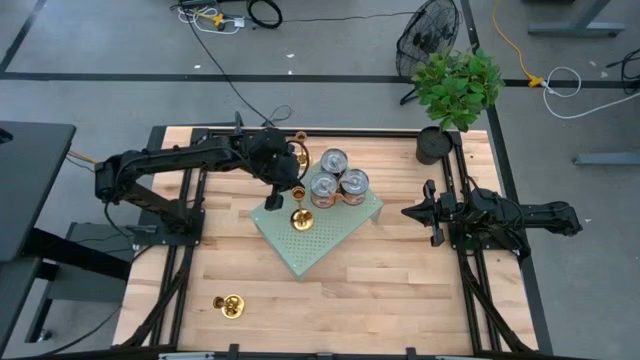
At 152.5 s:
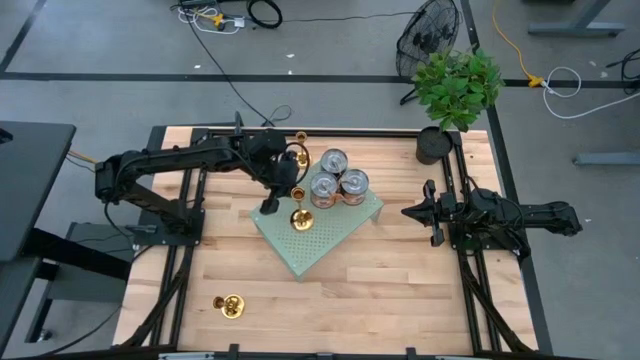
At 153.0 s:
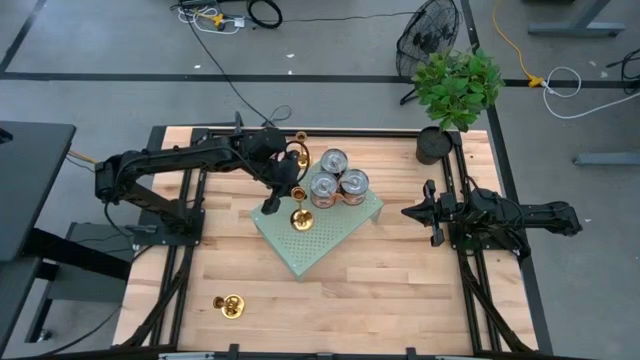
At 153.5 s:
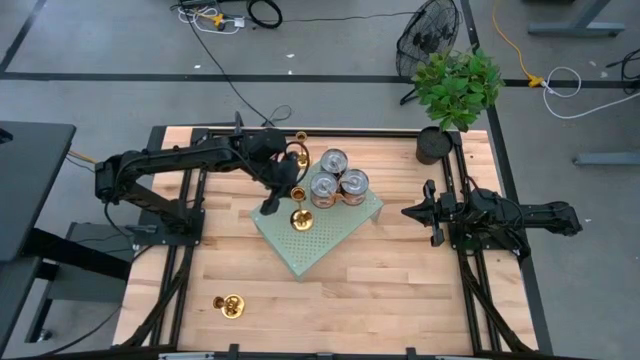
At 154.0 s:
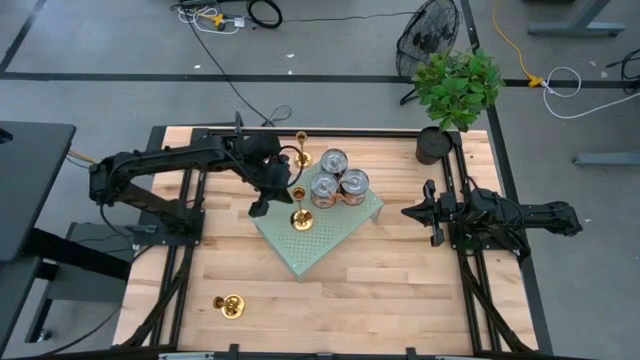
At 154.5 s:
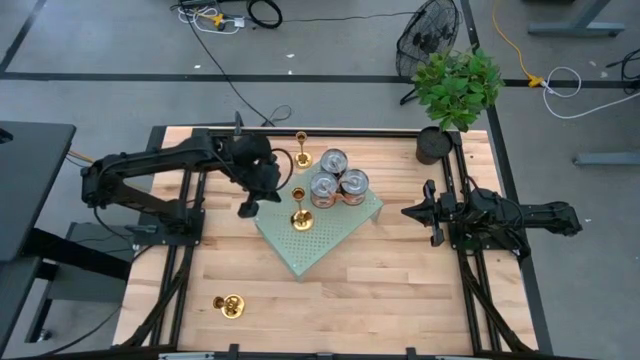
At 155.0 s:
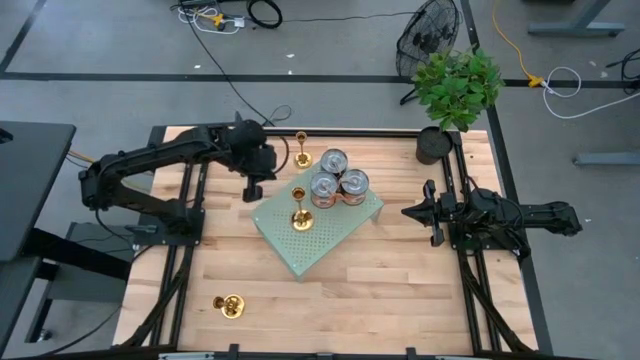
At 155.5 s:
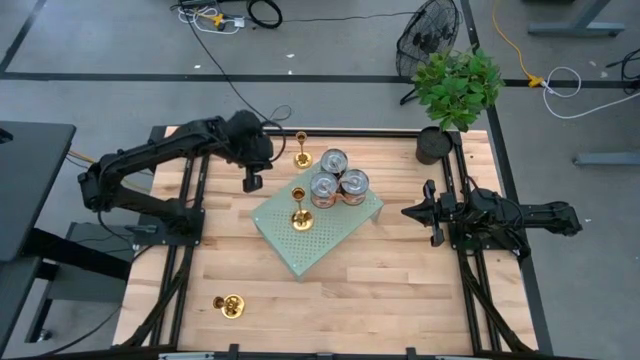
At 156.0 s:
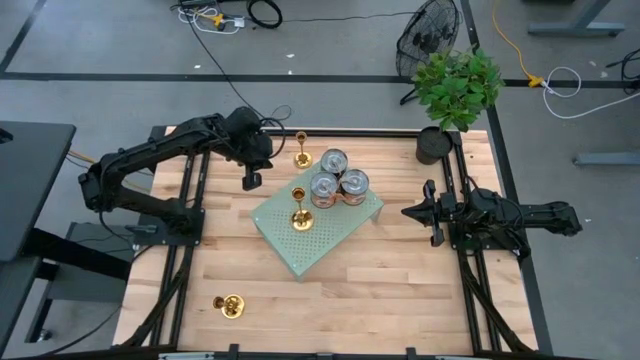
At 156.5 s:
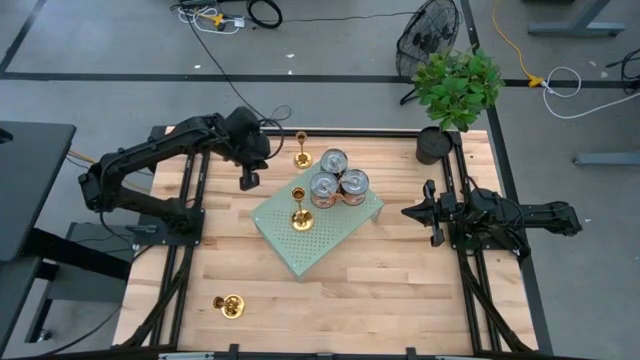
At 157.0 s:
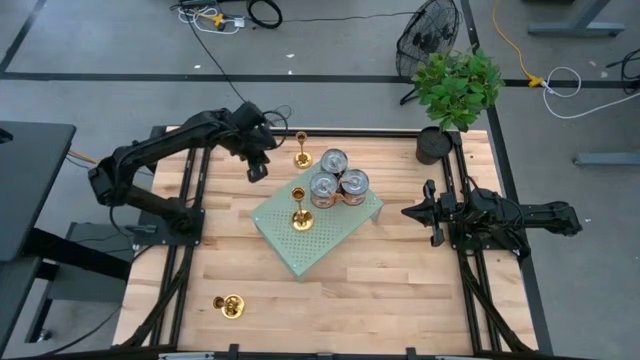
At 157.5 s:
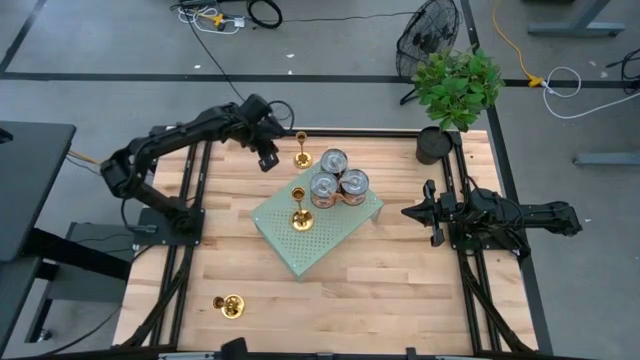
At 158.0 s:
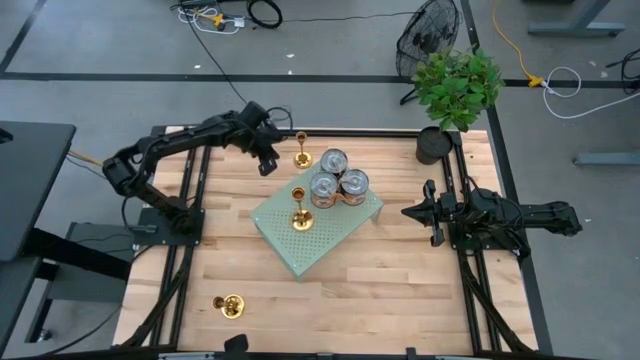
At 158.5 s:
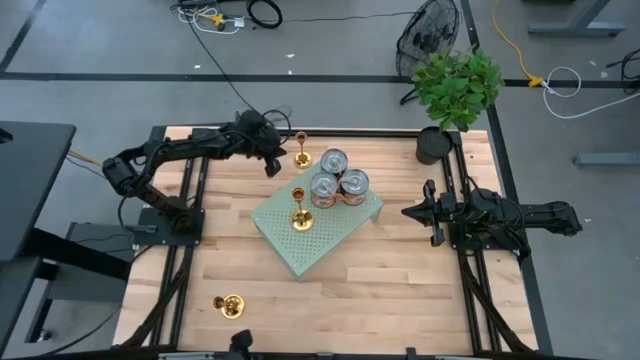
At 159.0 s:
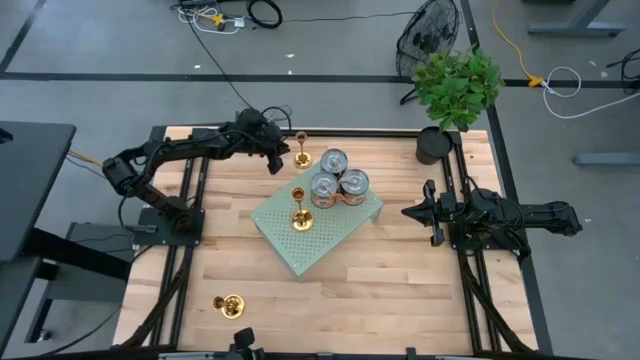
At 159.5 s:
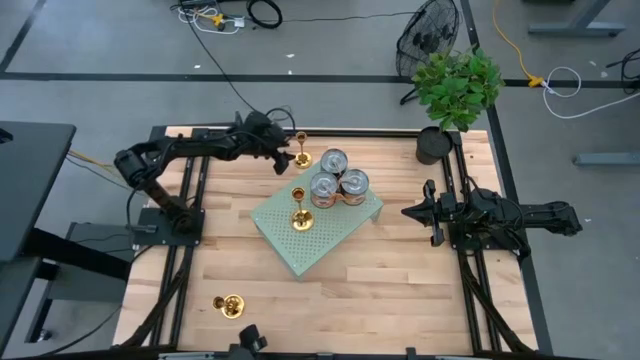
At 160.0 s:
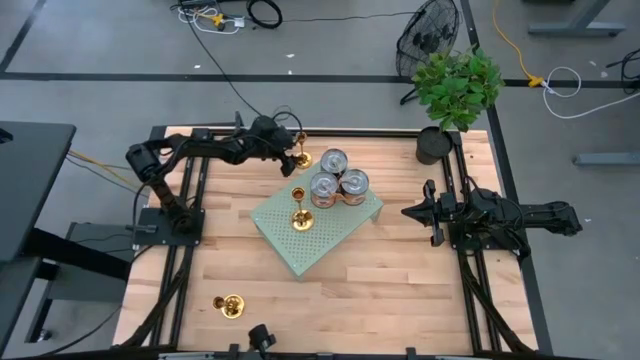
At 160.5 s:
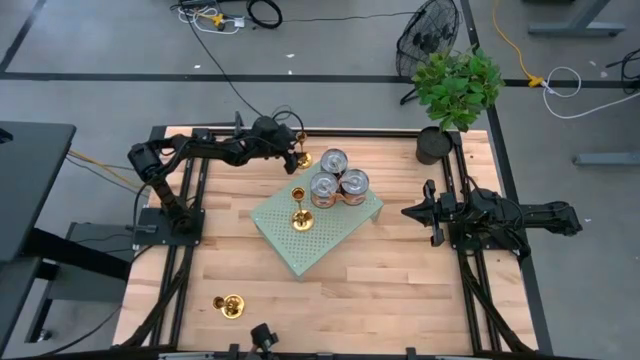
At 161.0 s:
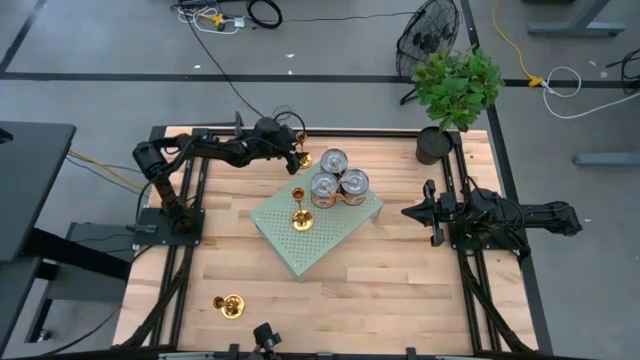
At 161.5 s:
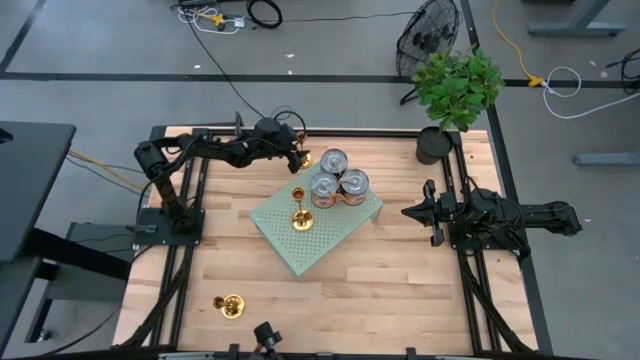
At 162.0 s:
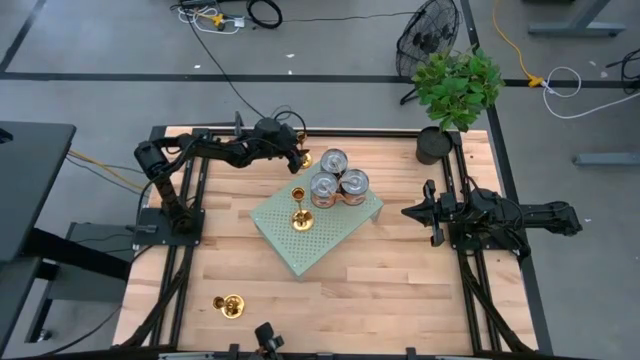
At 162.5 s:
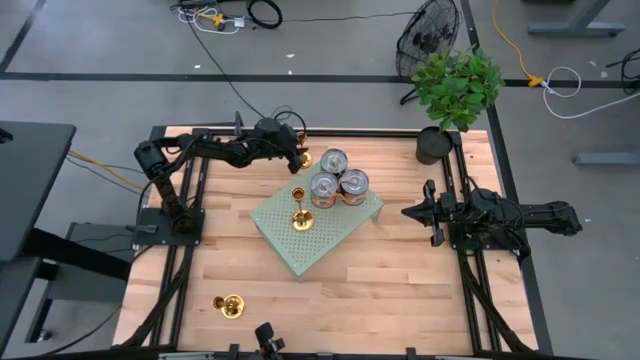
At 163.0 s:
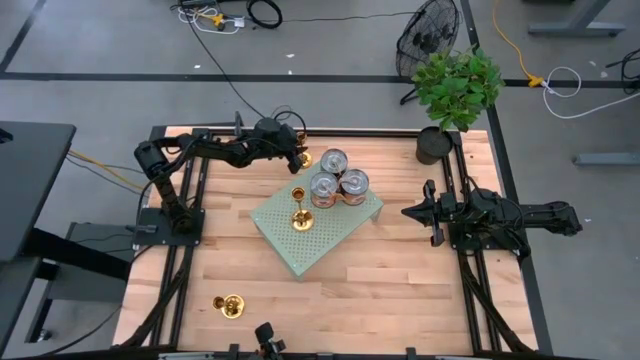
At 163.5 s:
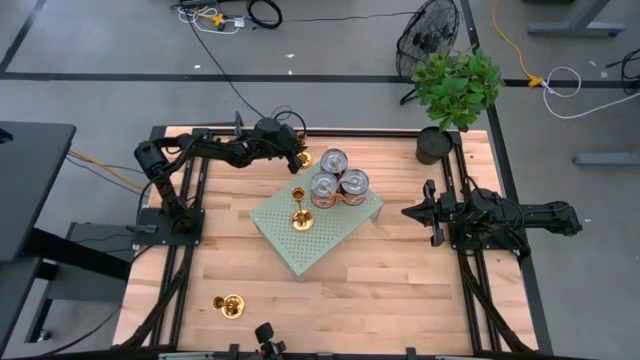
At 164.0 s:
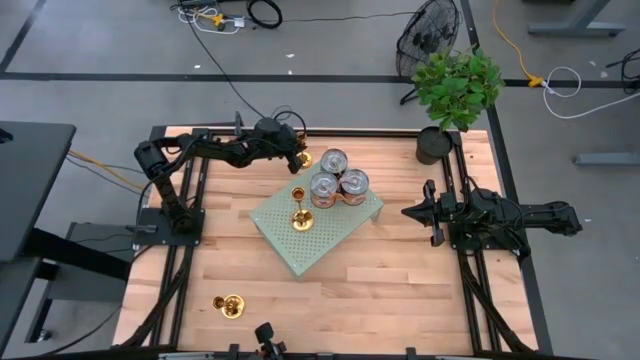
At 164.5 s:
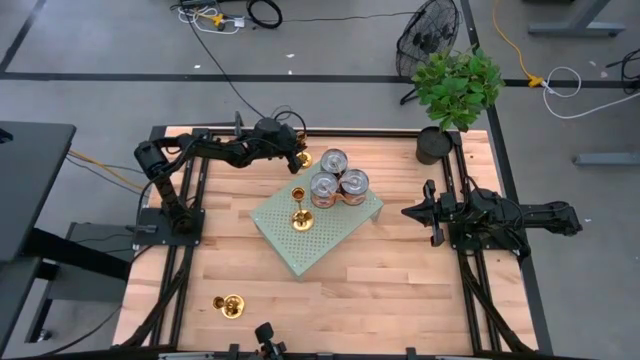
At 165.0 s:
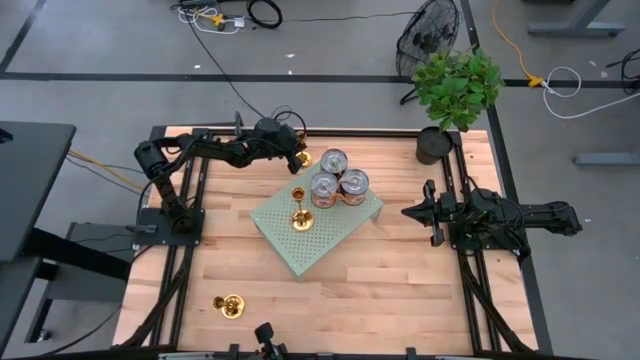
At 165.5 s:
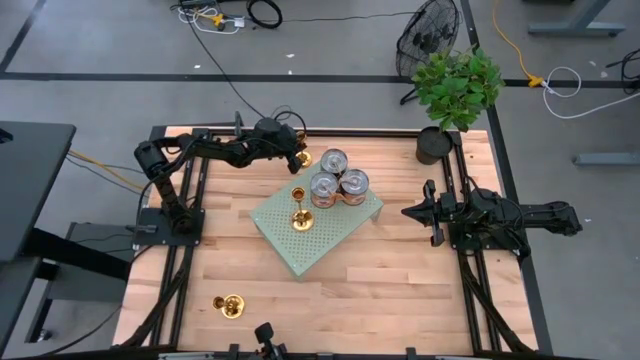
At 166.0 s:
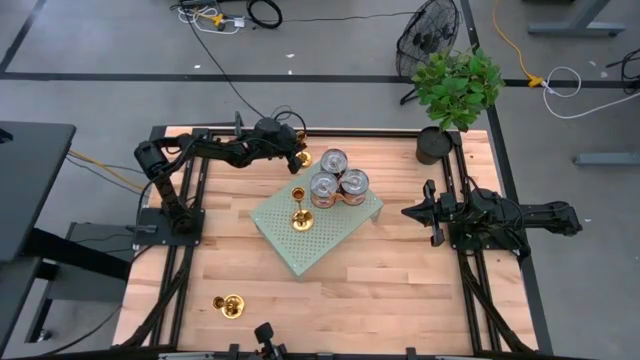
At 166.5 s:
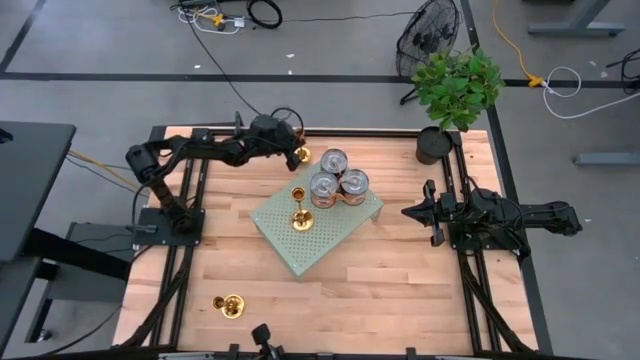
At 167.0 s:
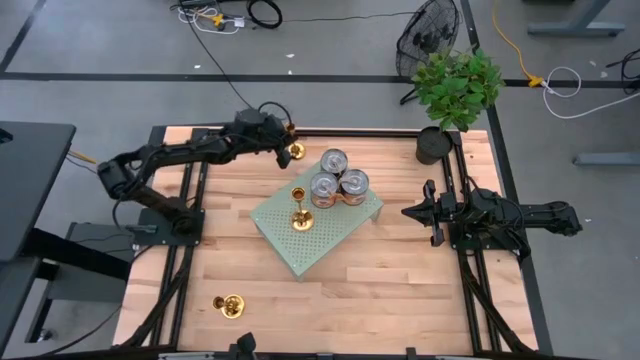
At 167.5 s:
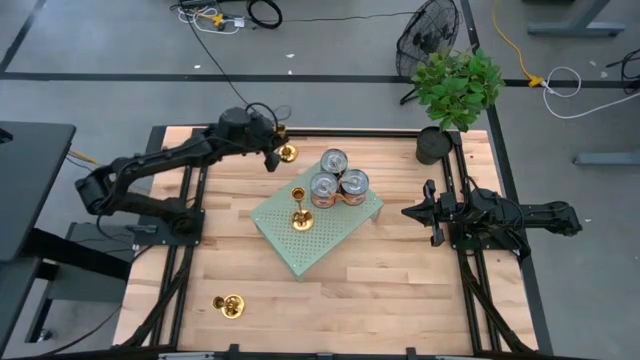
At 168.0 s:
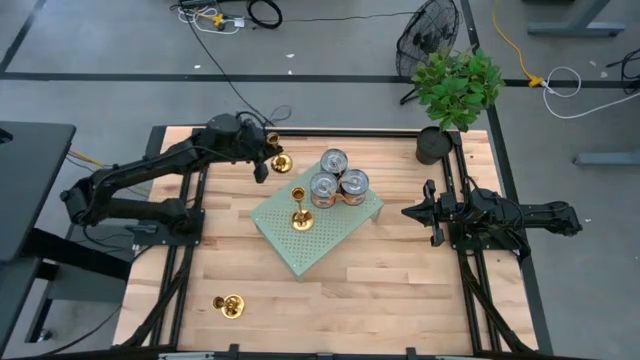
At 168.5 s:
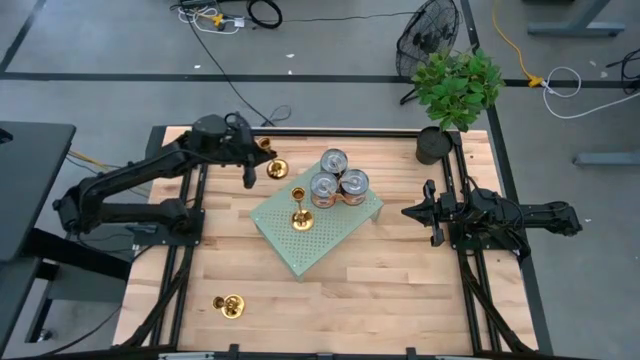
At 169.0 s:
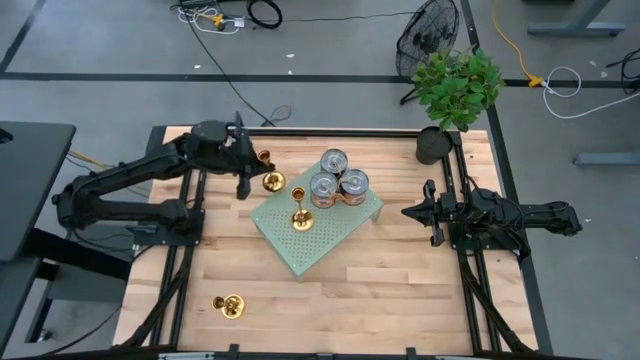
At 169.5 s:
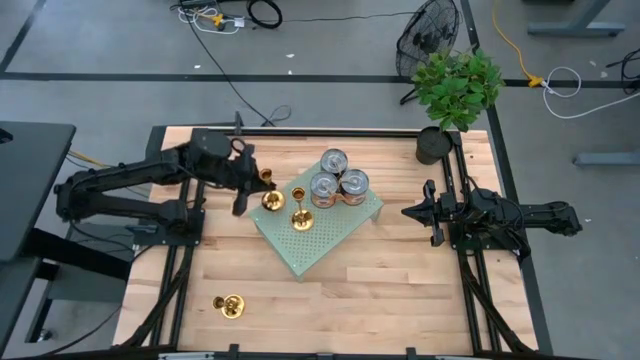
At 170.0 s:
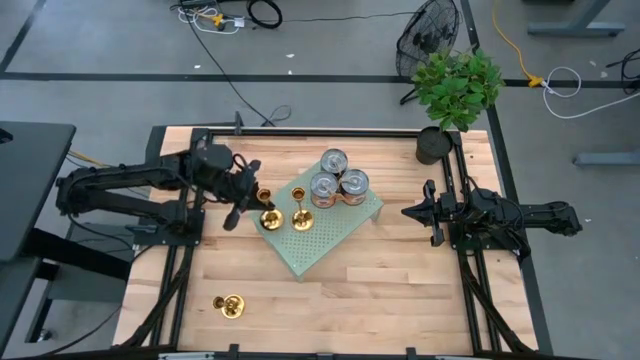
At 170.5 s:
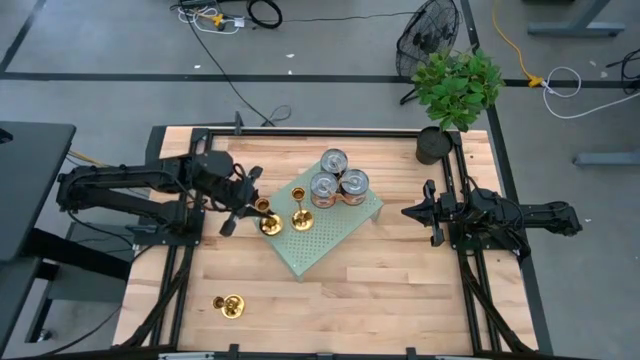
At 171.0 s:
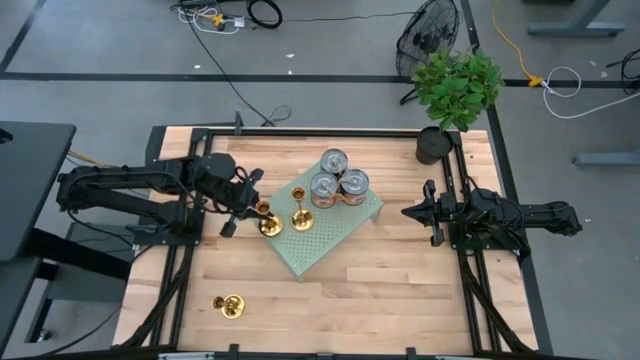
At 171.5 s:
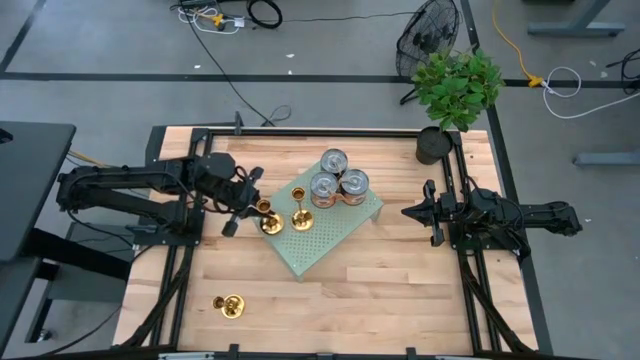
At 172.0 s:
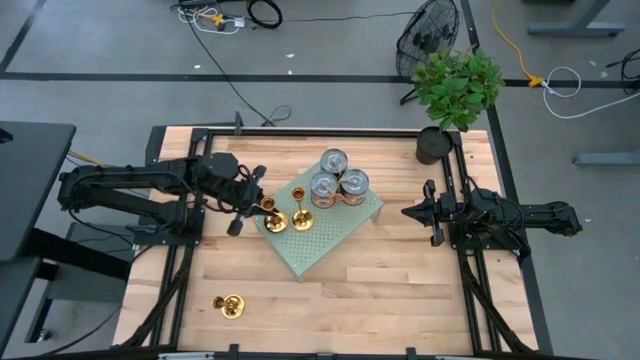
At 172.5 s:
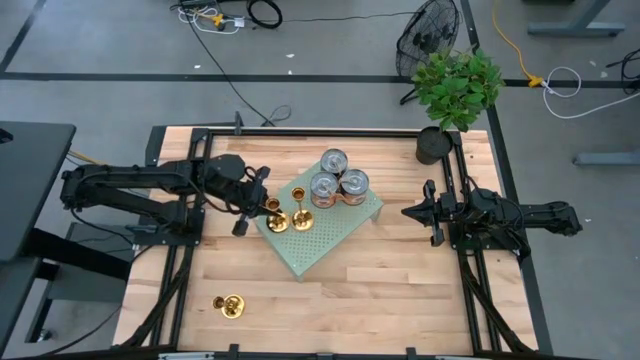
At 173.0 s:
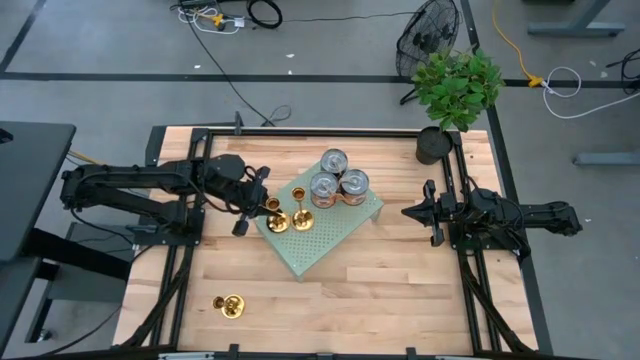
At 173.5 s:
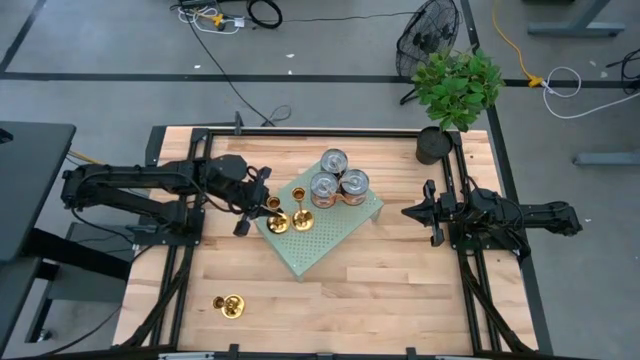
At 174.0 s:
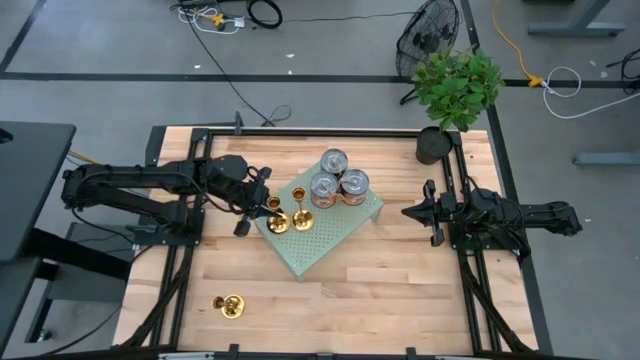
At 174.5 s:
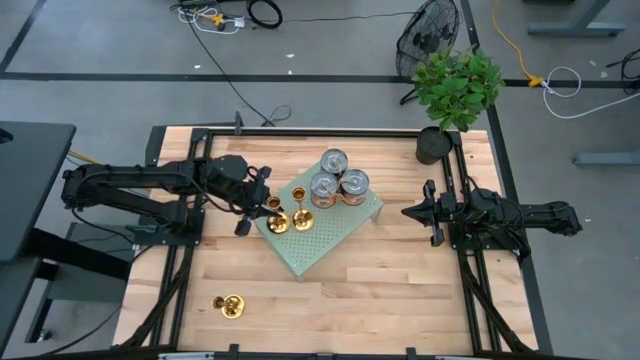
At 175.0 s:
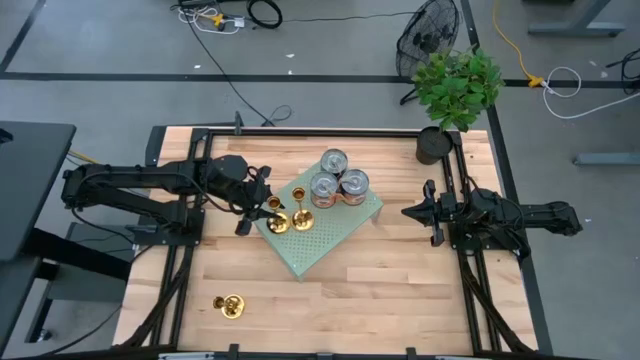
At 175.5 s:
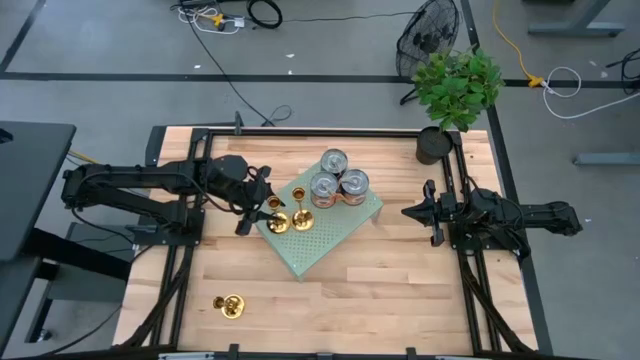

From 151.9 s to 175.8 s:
Task: Pick & Place candle stick holders
Put the top gold candle holder on the shelf
